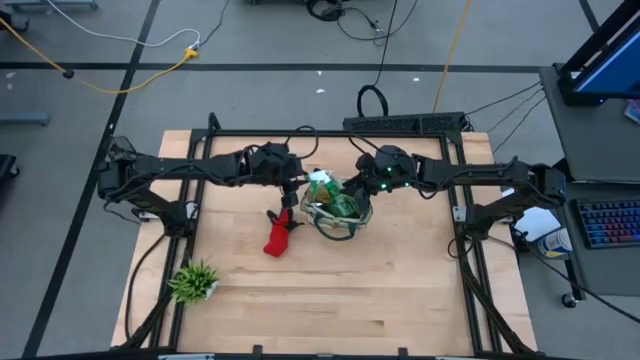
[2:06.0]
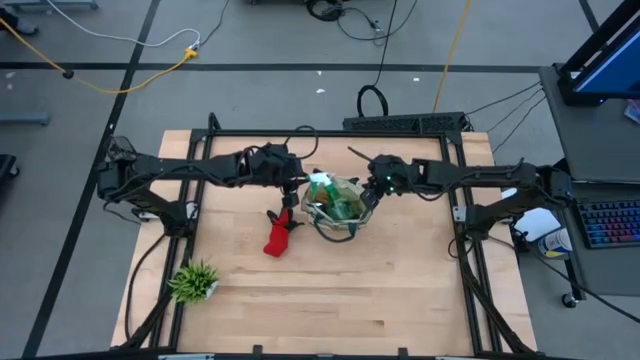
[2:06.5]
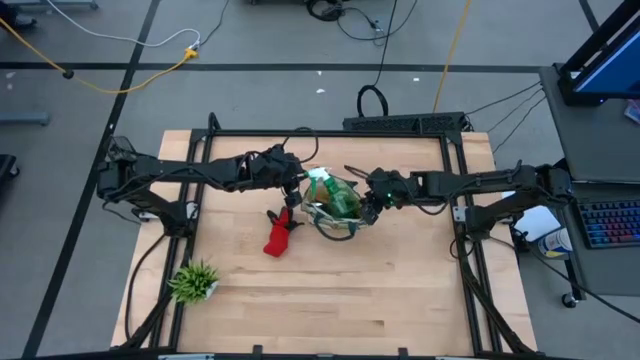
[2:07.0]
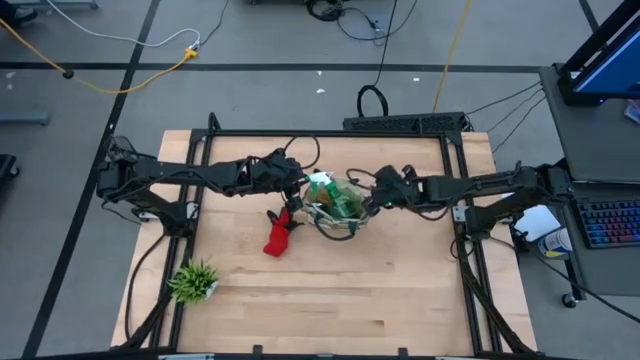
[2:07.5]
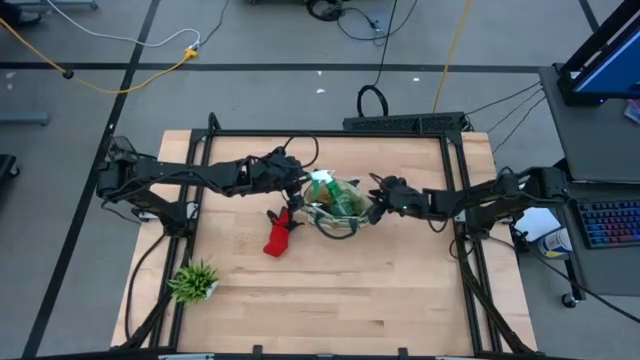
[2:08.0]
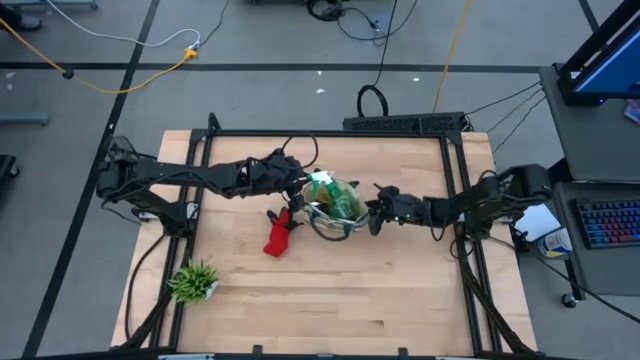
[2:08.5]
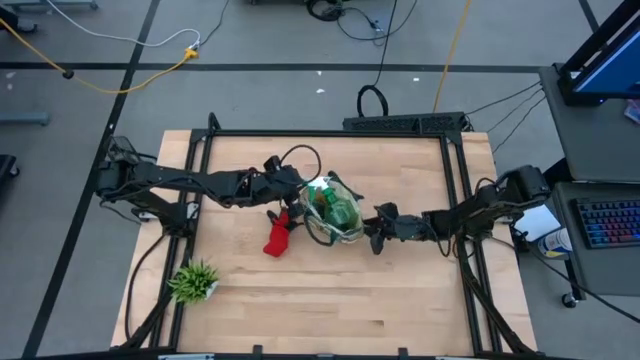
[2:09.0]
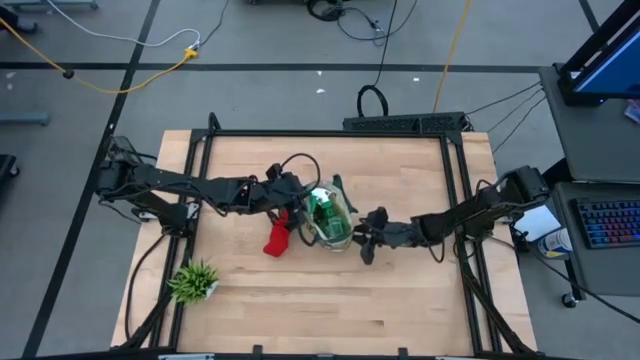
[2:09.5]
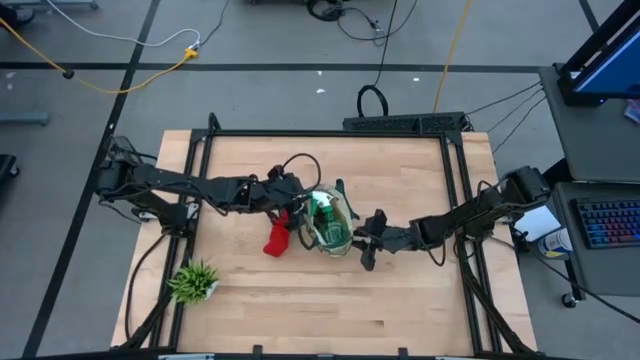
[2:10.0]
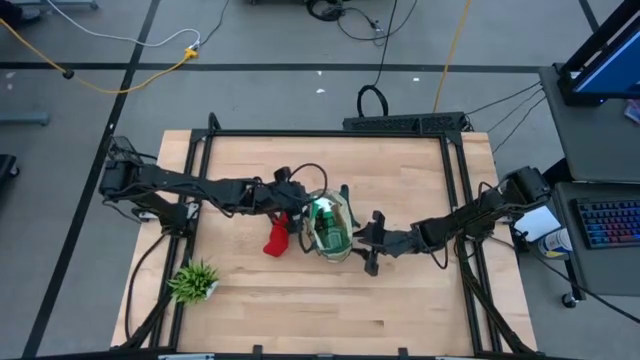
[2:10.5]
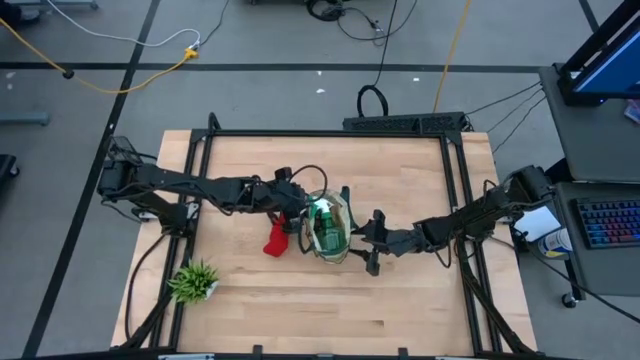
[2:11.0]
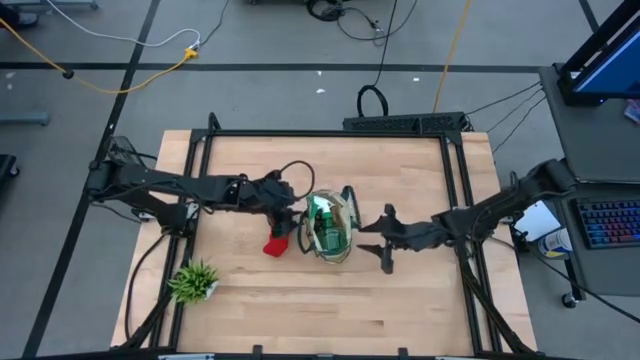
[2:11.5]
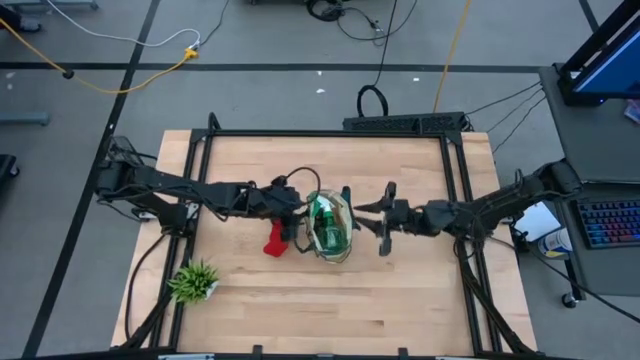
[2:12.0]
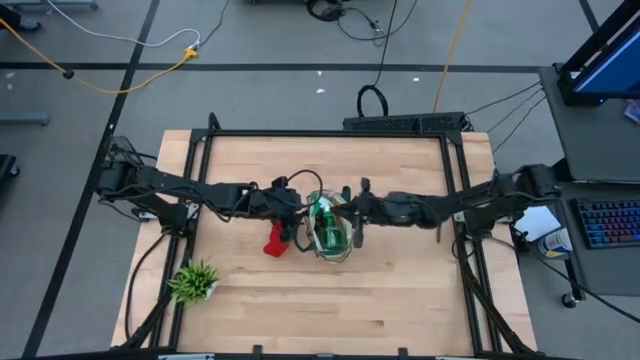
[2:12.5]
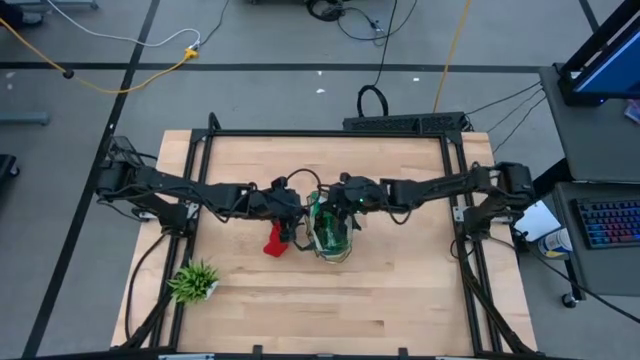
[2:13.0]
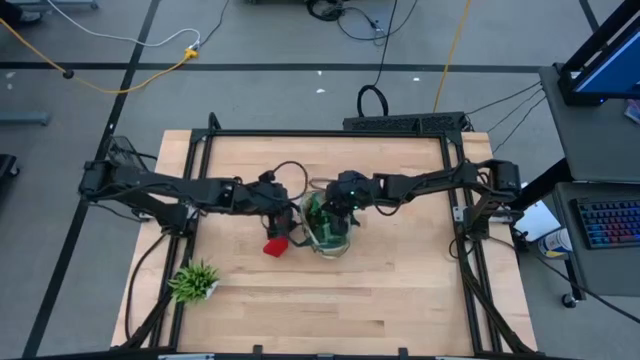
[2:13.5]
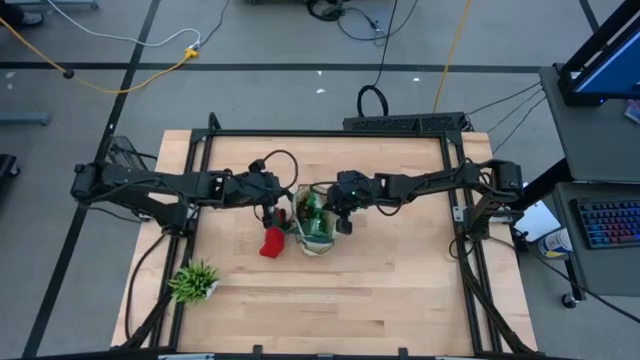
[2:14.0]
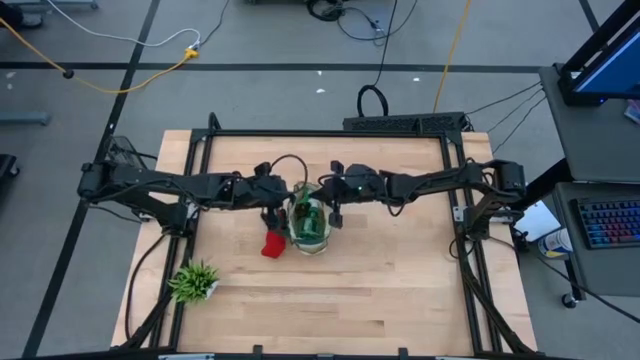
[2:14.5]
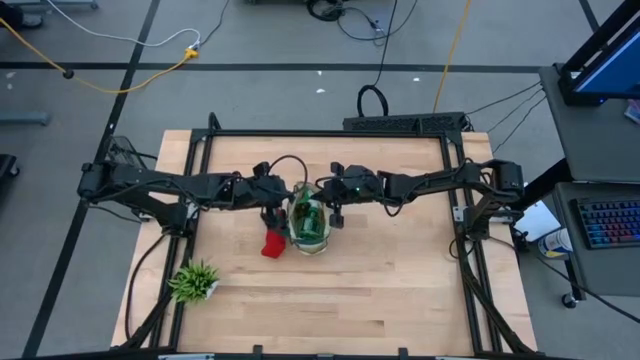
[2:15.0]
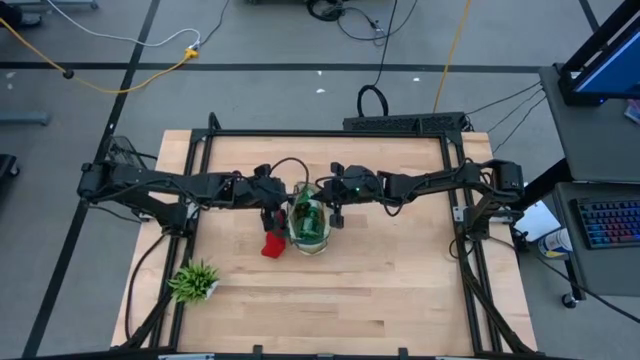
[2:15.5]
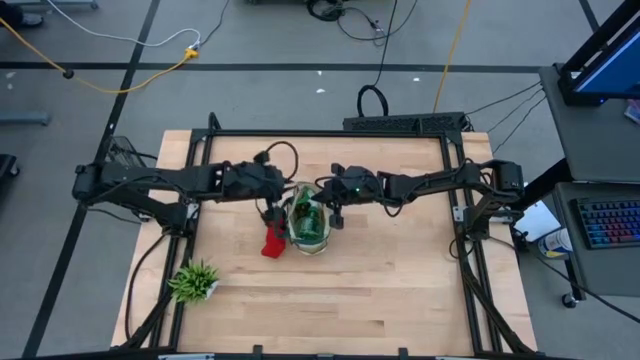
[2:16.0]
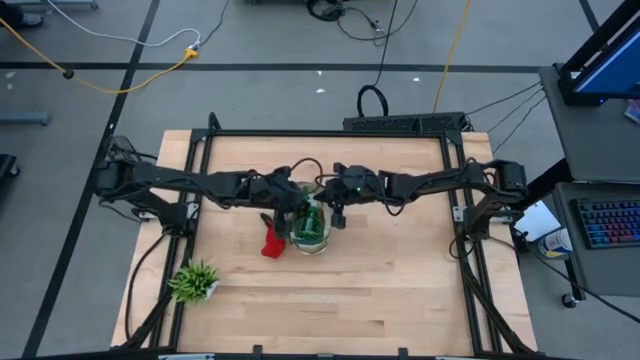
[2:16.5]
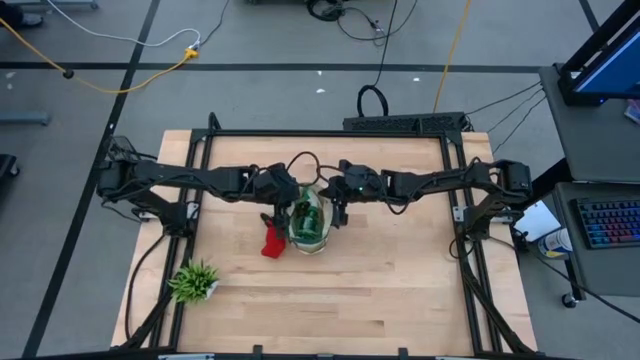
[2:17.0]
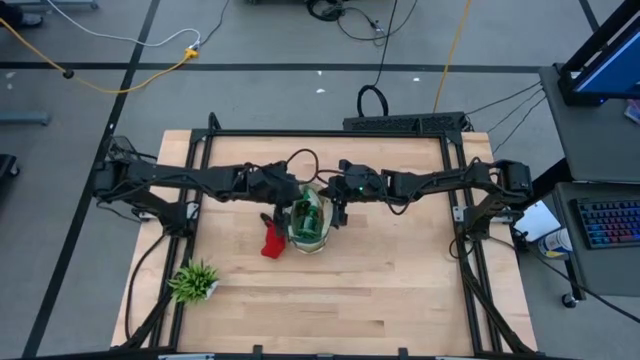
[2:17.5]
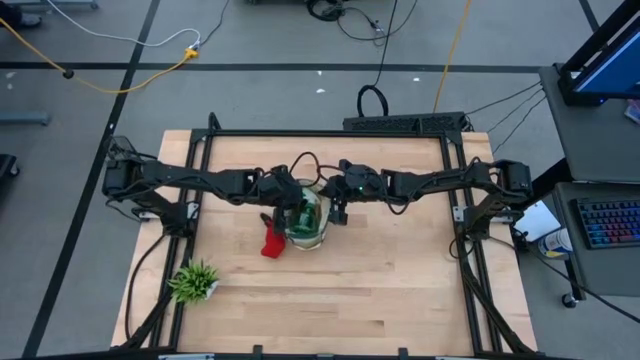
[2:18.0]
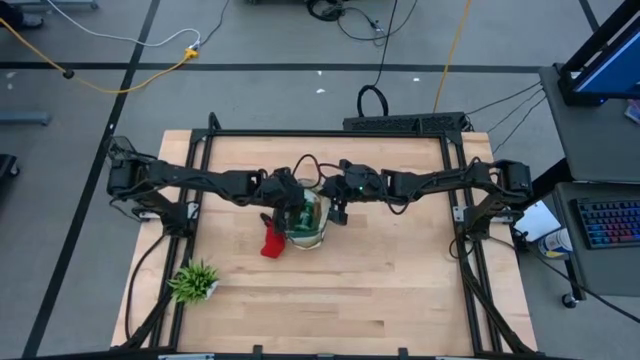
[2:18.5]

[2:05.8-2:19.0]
Task: Pick & Place Garden tools in Gardening bag
Put the green spray bottle into the gardening bag

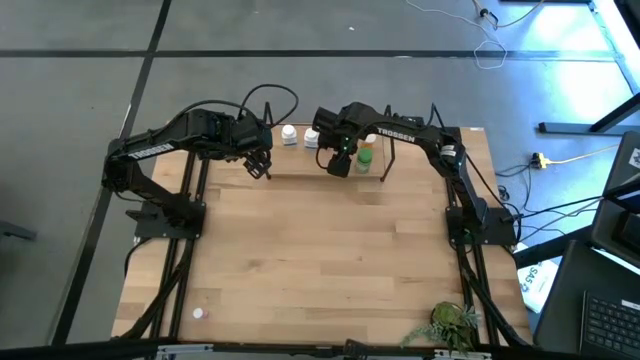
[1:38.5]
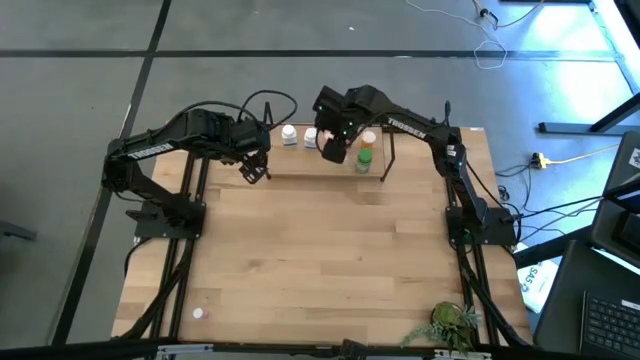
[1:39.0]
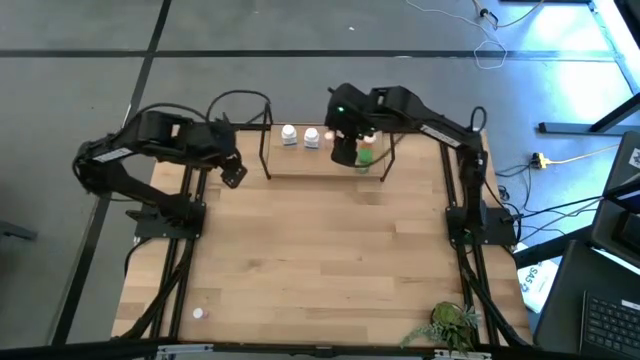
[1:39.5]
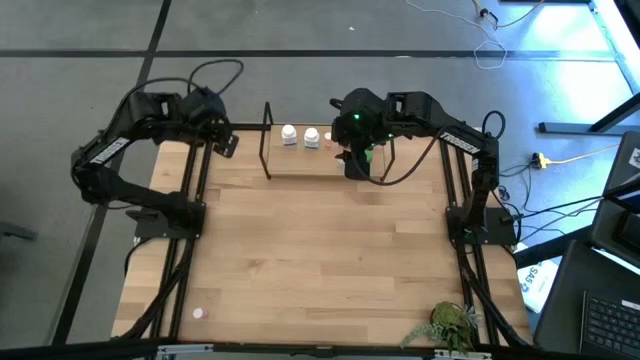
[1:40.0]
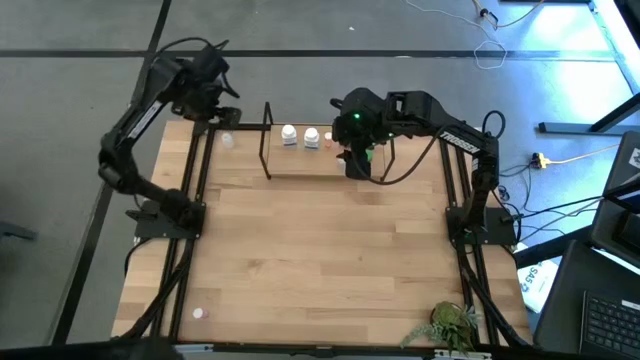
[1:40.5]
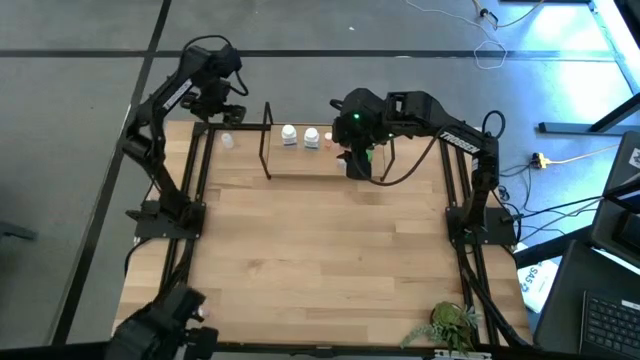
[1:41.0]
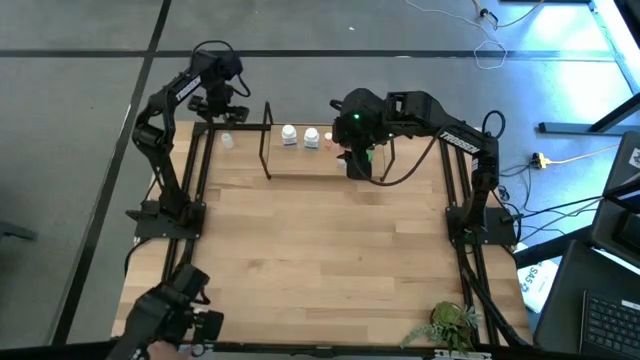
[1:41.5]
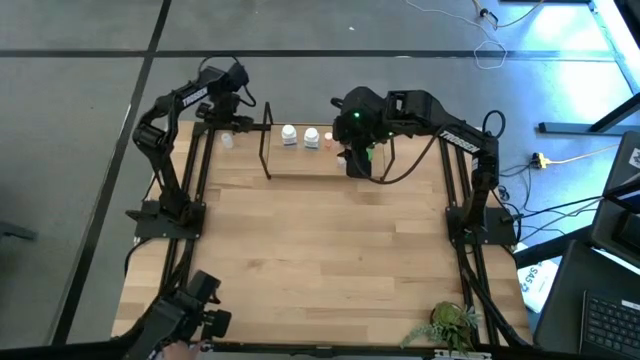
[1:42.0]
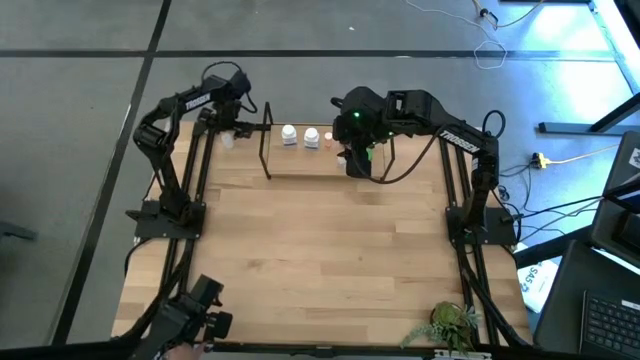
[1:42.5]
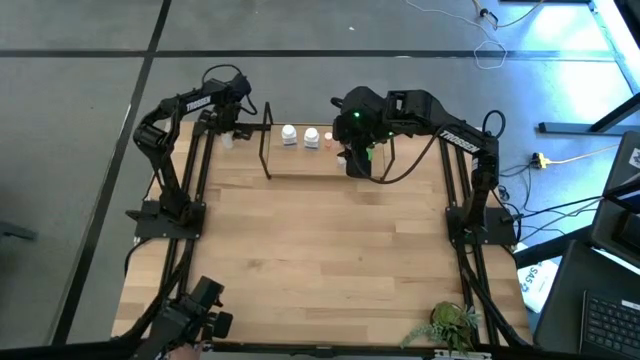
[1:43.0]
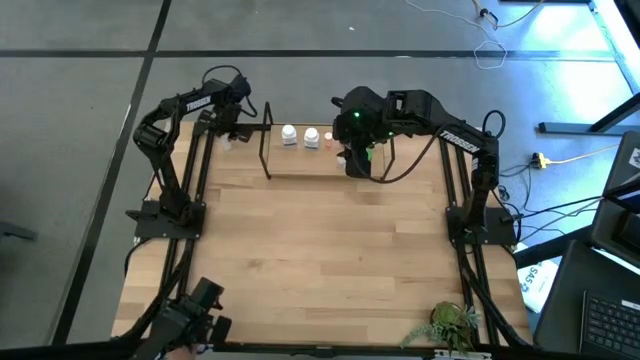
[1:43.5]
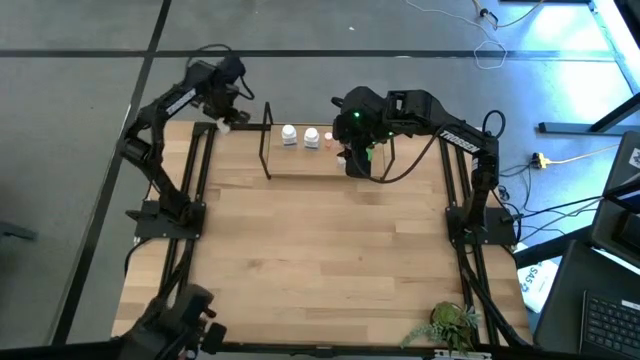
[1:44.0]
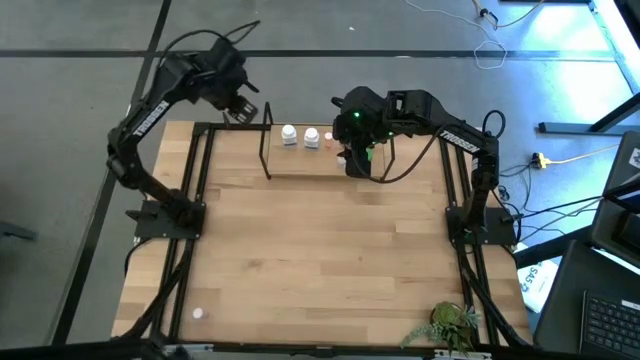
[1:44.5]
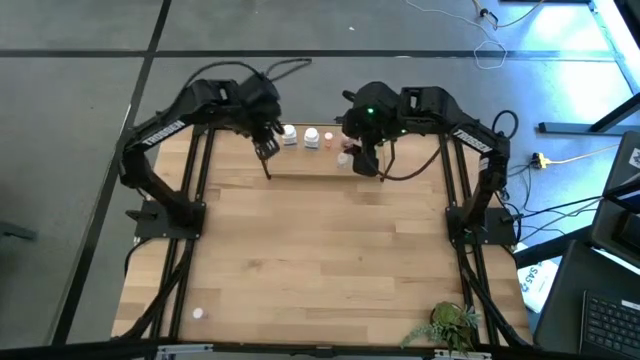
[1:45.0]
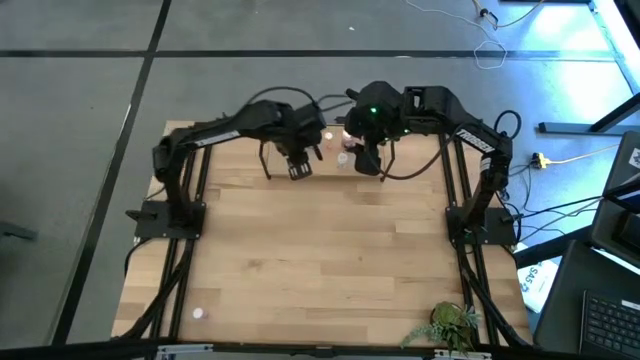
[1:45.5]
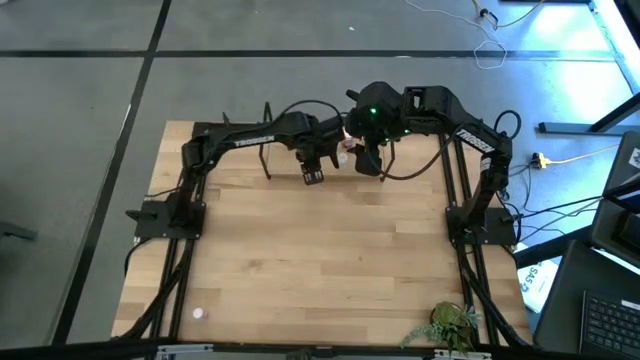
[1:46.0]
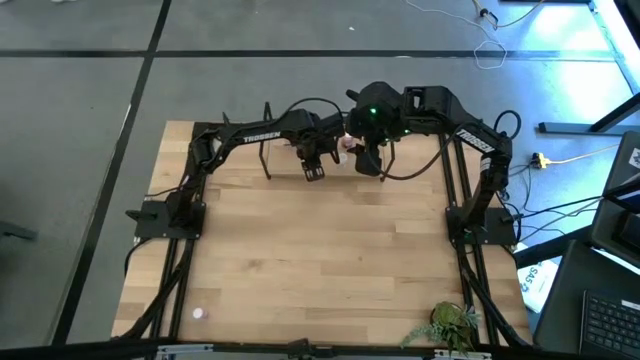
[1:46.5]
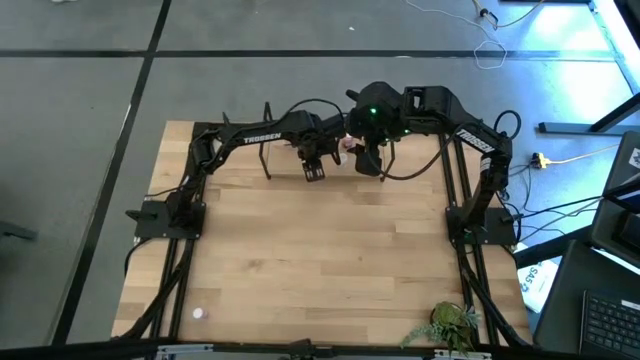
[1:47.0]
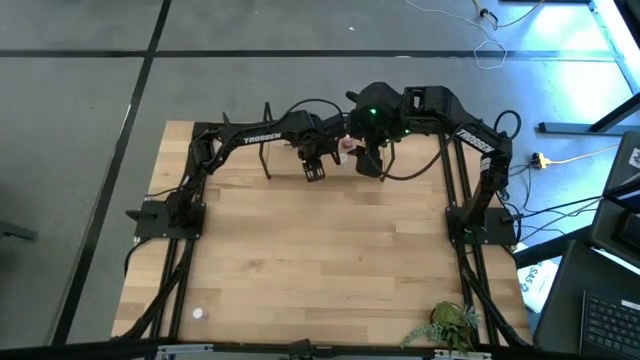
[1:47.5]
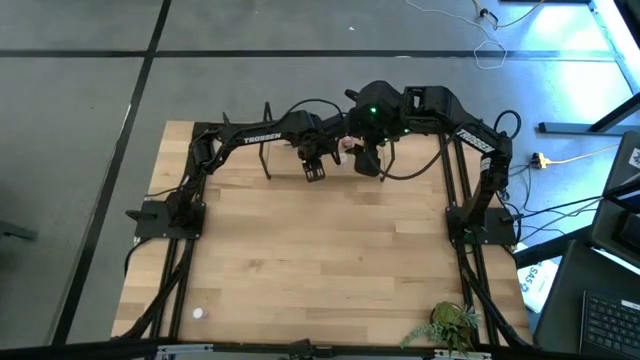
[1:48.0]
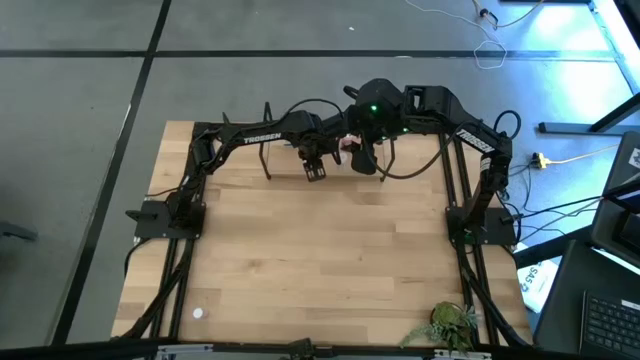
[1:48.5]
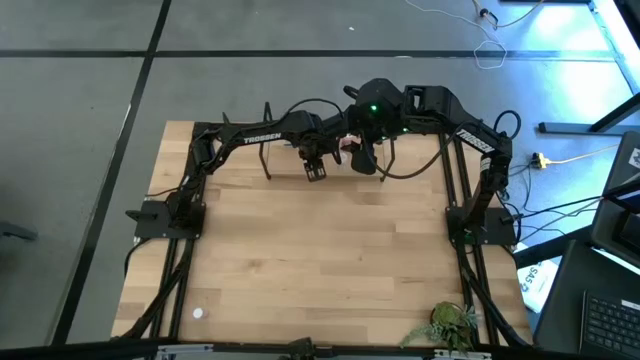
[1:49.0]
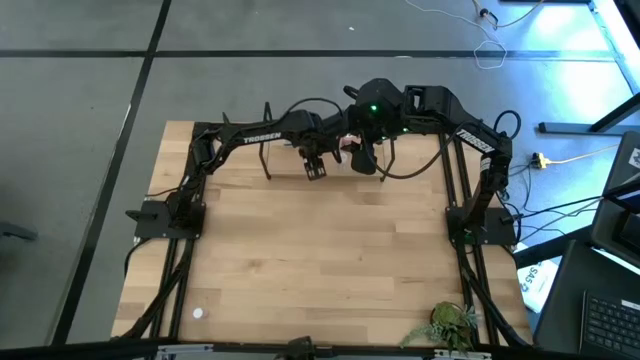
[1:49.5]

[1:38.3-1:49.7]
Task: Pick and place medicine bottles onto shelf by color
Put the transparent pill bottle on the shelf
